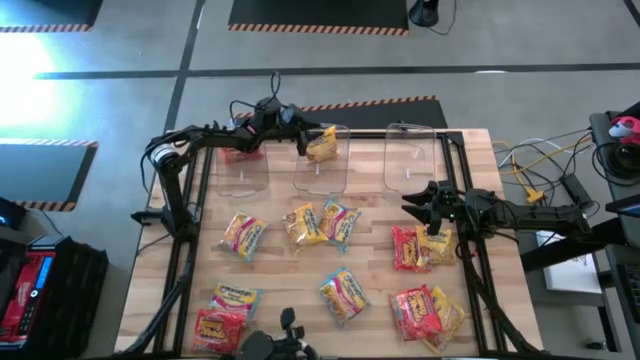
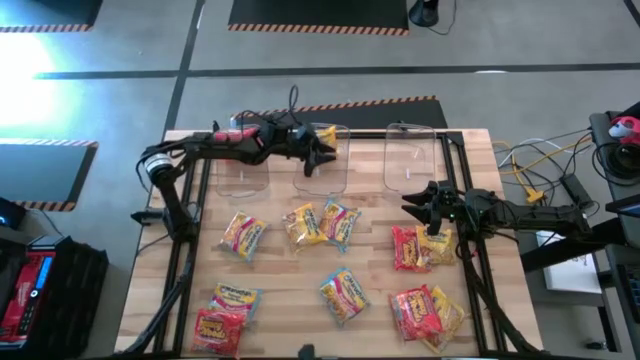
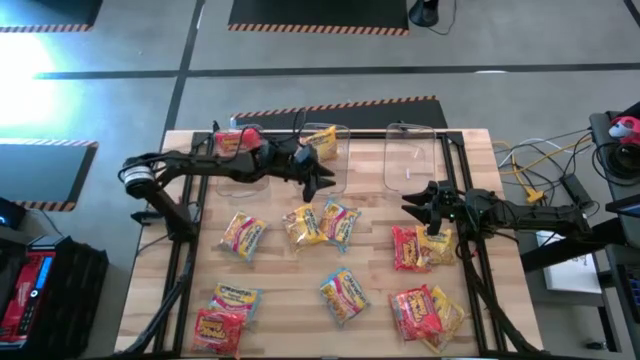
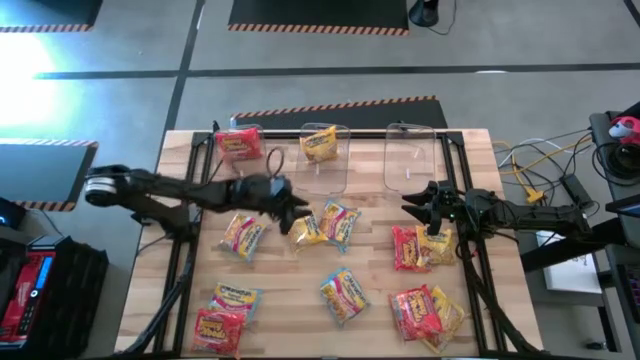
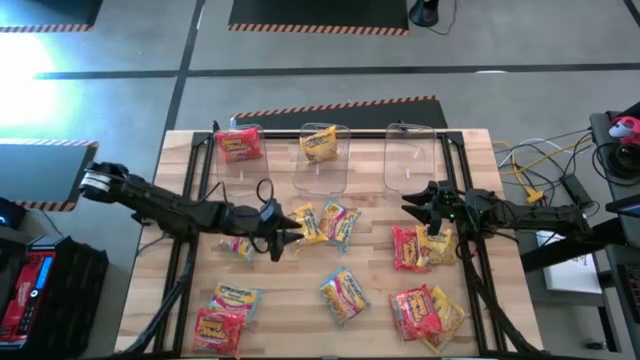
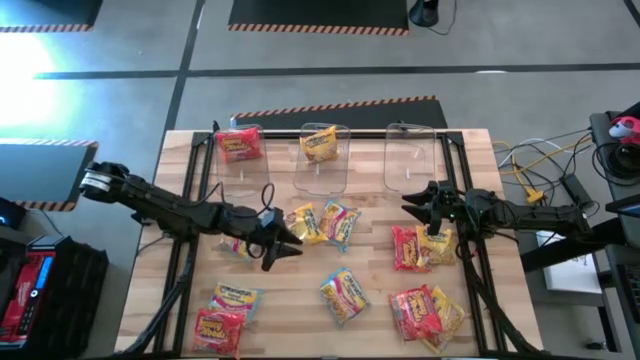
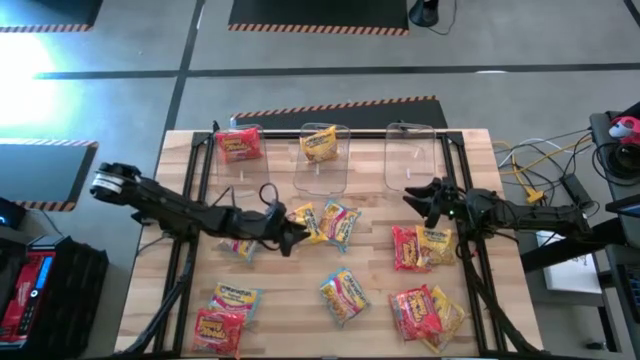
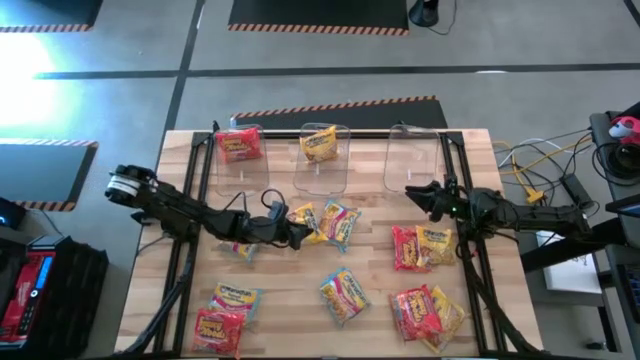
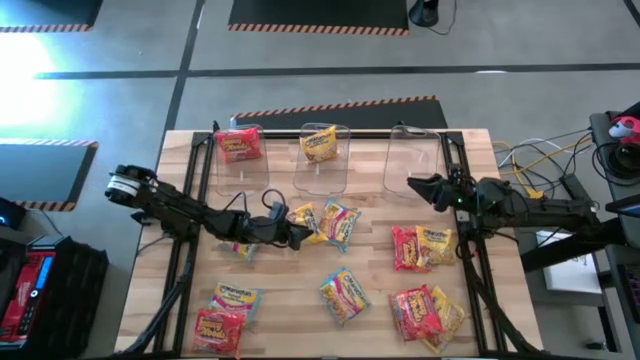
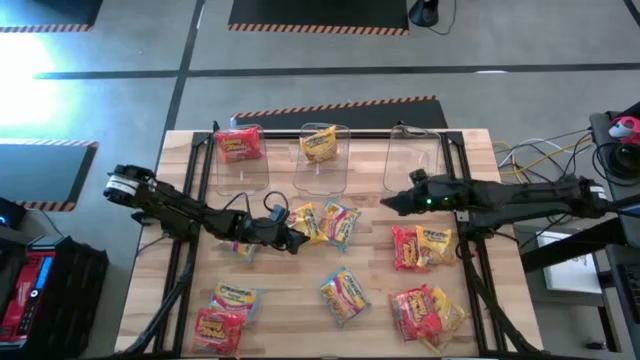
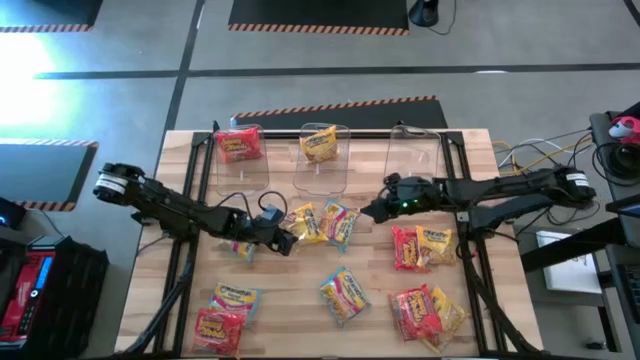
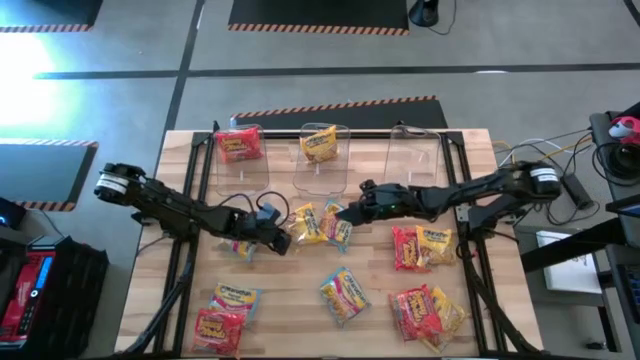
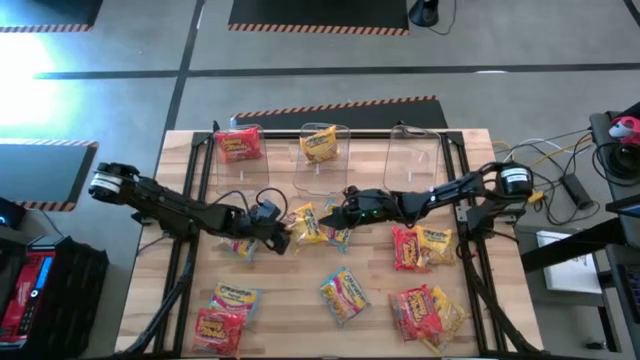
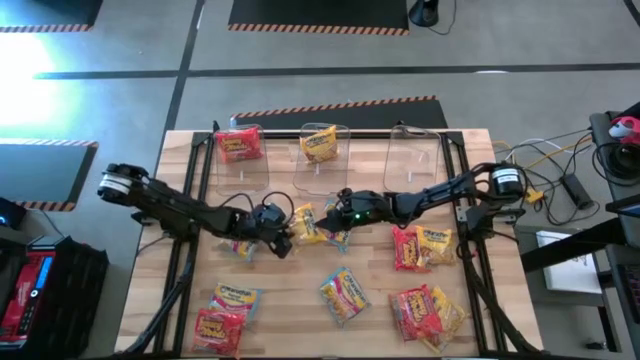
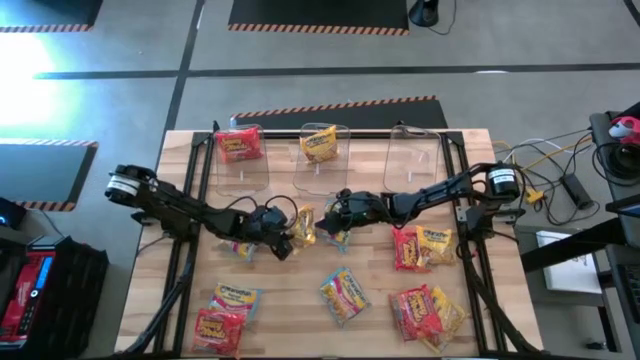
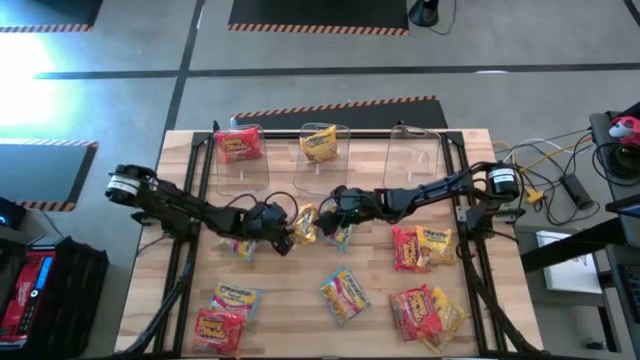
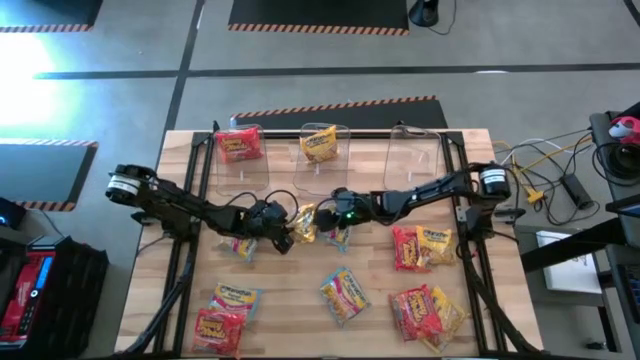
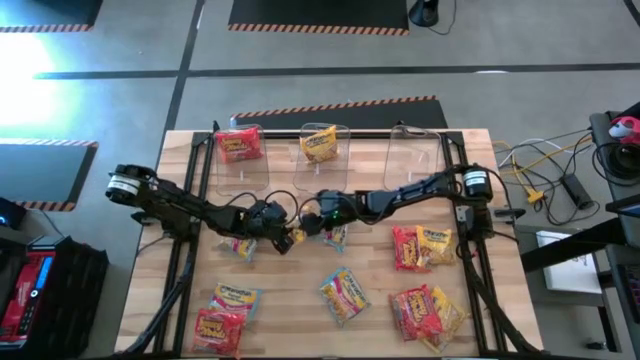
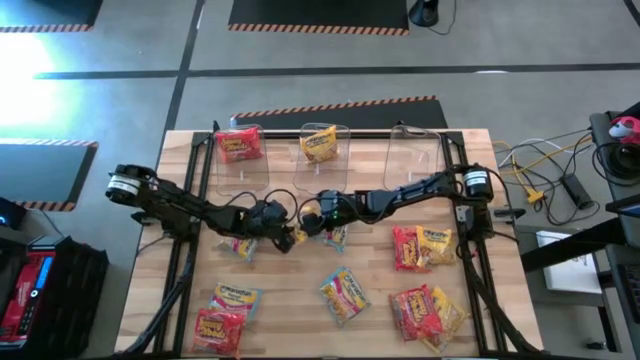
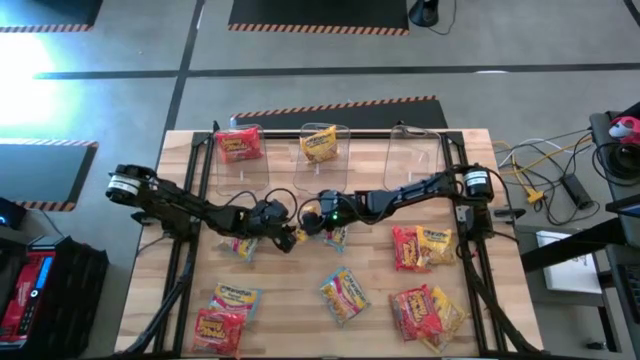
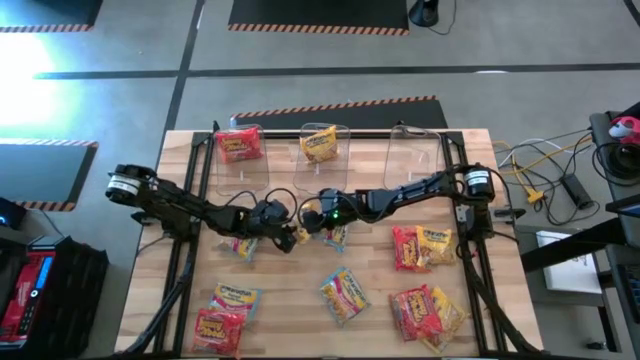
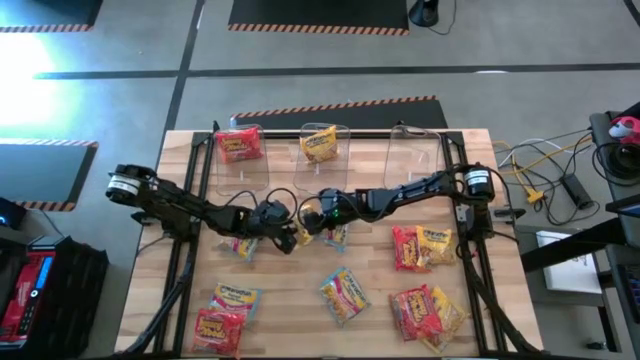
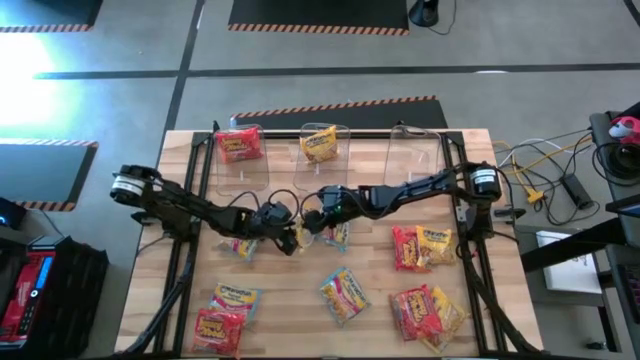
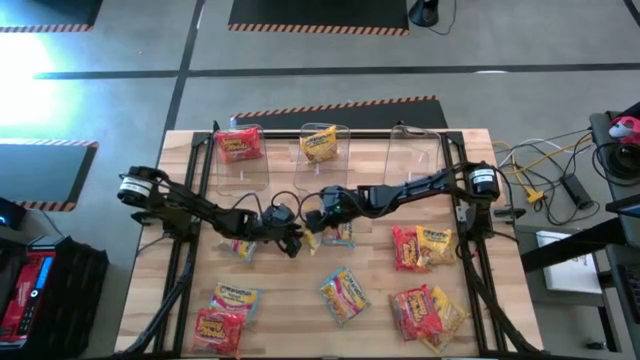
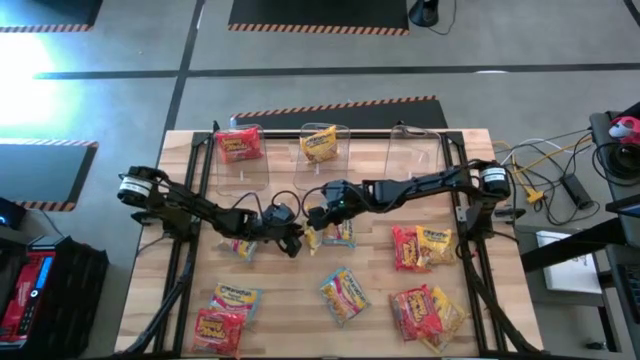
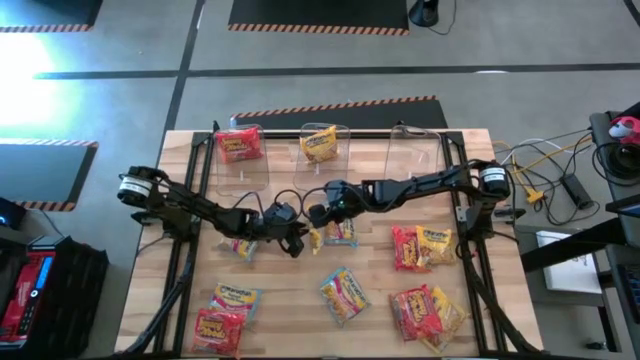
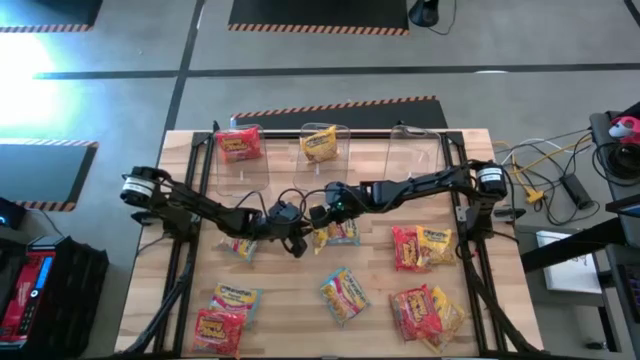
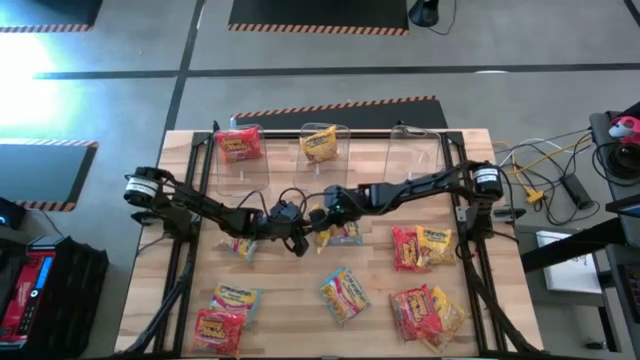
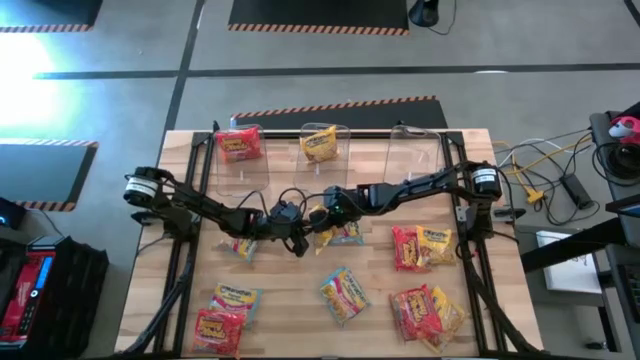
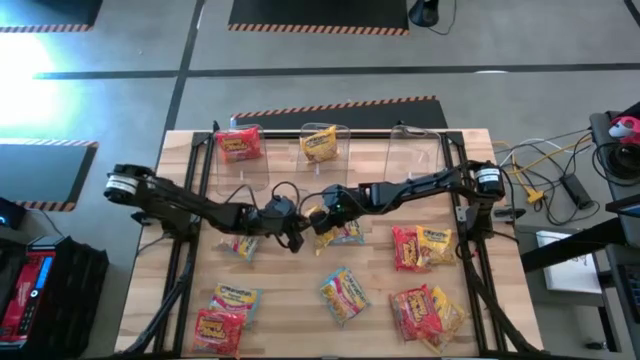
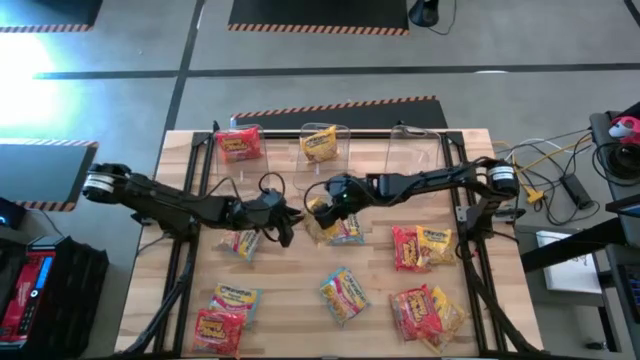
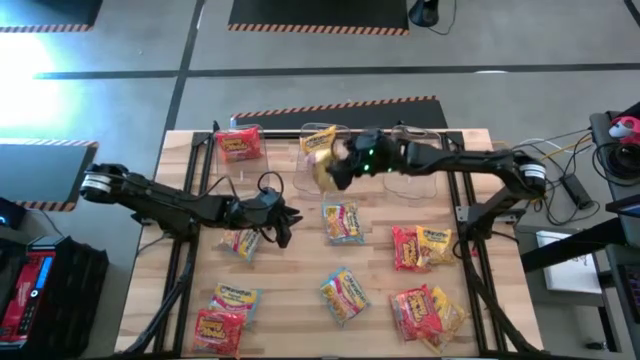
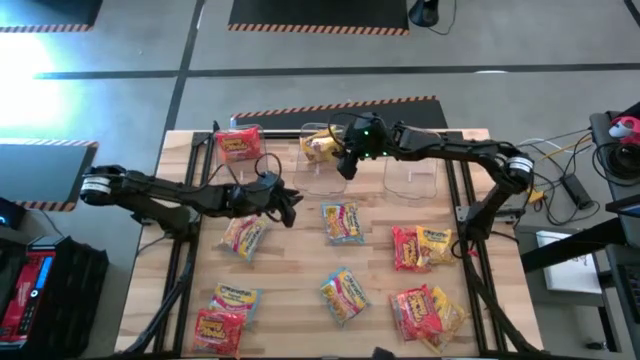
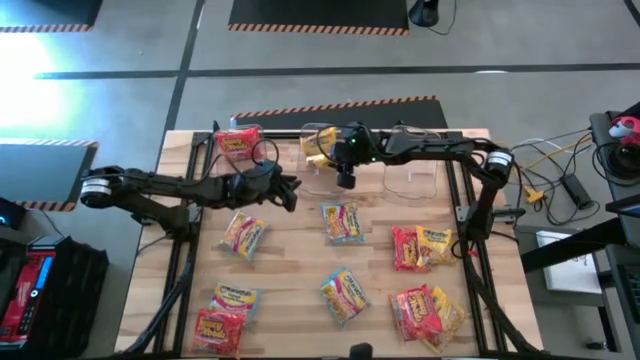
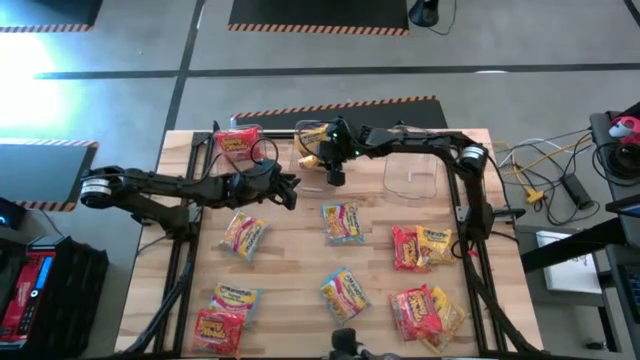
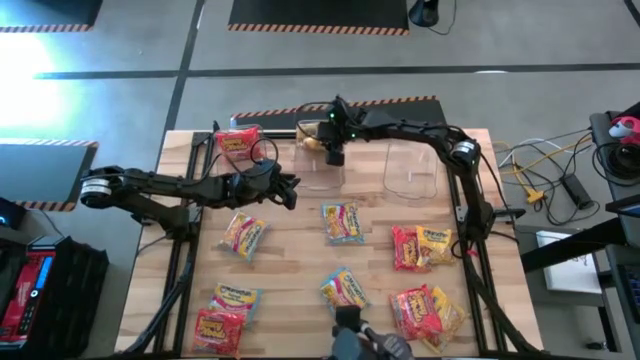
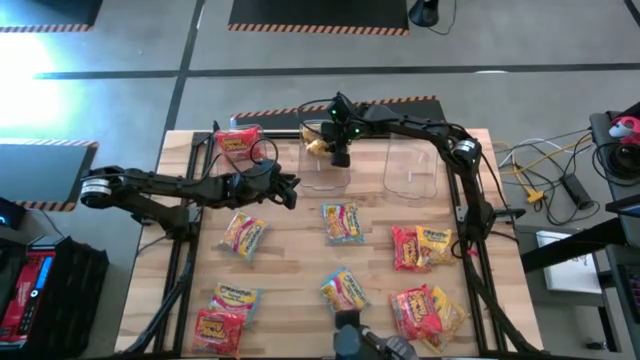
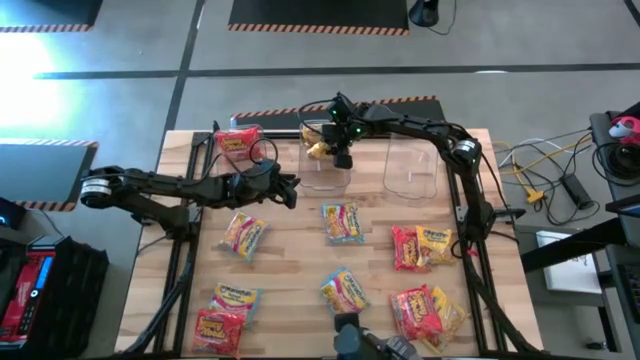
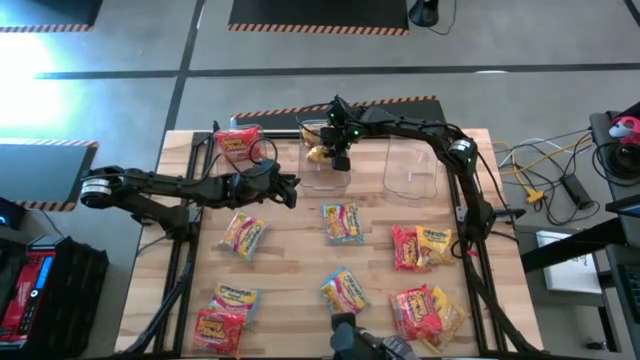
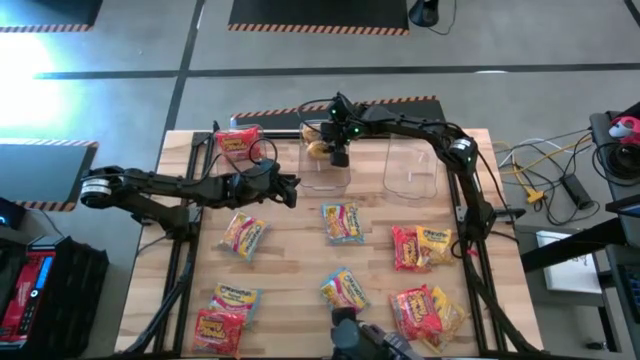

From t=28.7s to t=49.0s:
Task: Sort Maruchan noodles
Put the yellow noodle pack into the middle transparent bin
